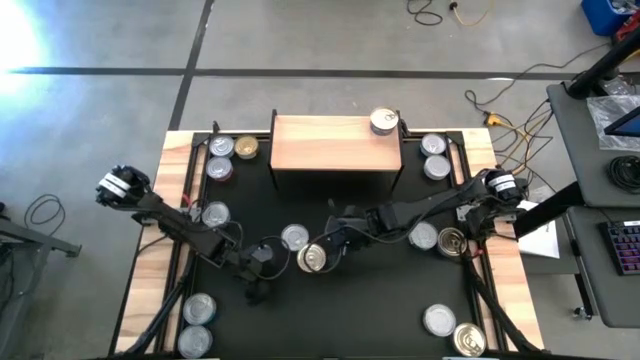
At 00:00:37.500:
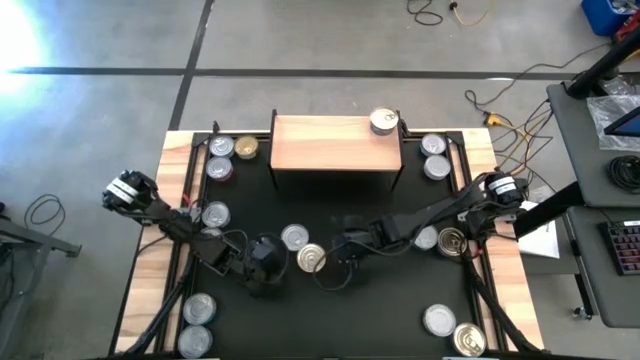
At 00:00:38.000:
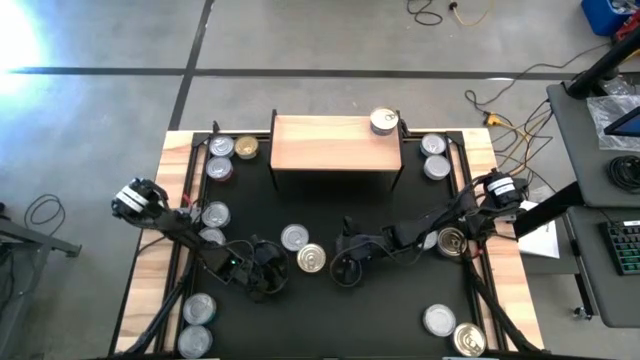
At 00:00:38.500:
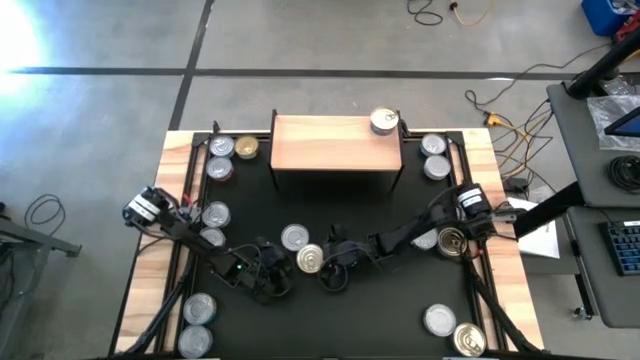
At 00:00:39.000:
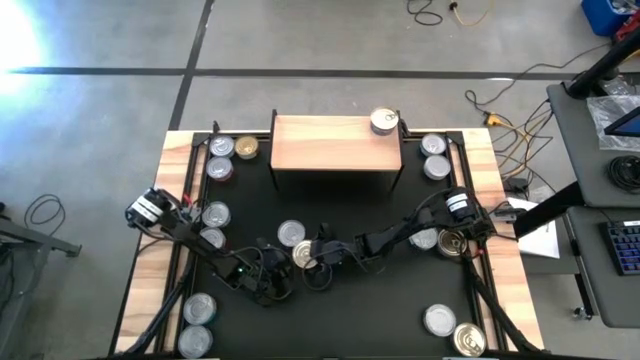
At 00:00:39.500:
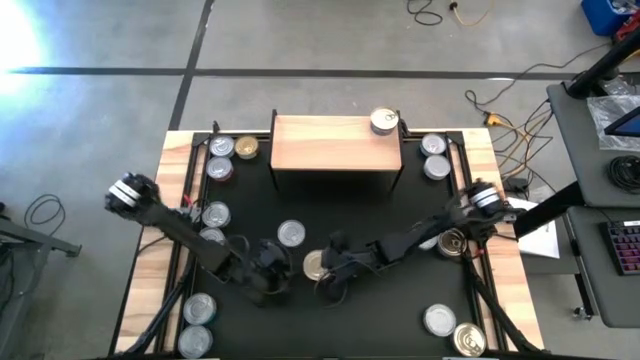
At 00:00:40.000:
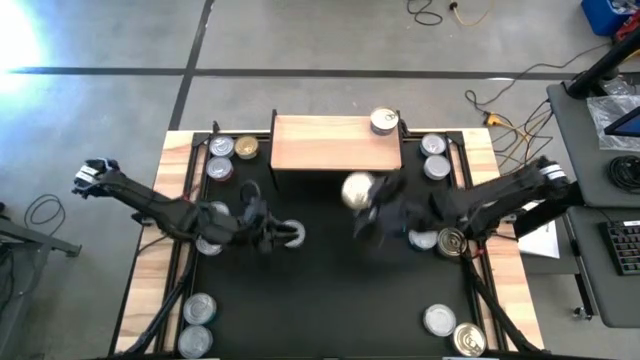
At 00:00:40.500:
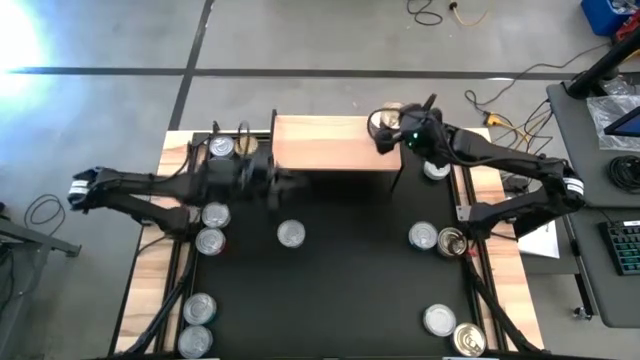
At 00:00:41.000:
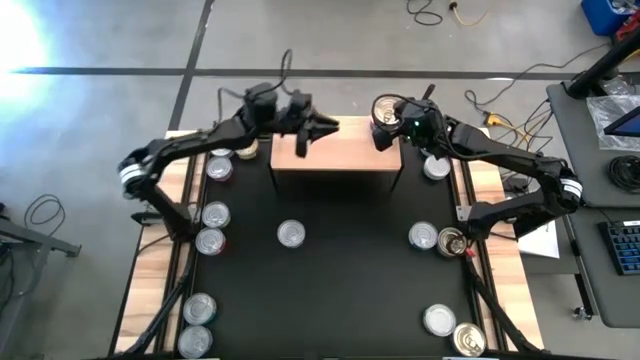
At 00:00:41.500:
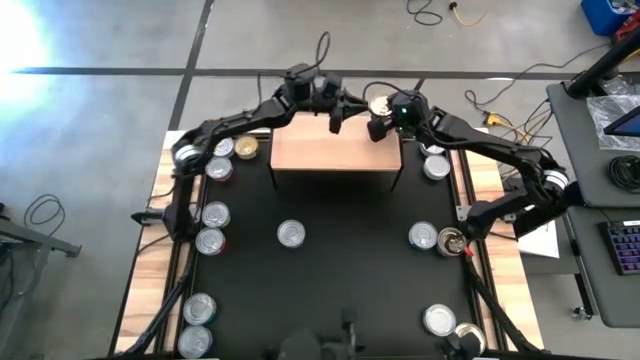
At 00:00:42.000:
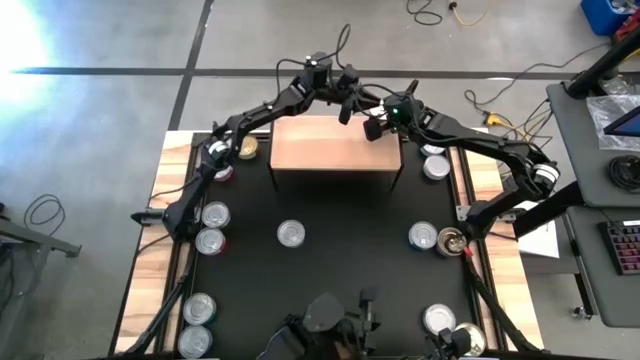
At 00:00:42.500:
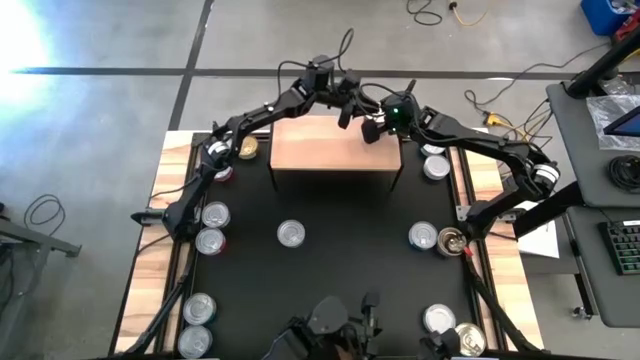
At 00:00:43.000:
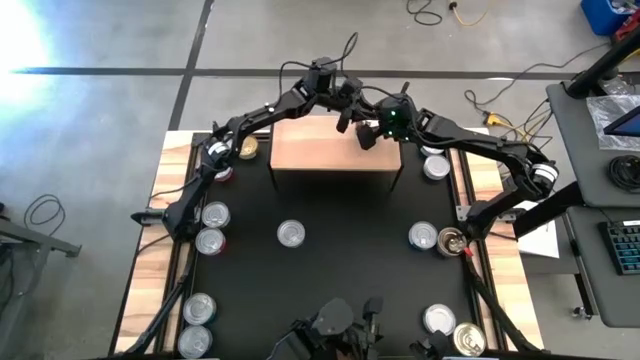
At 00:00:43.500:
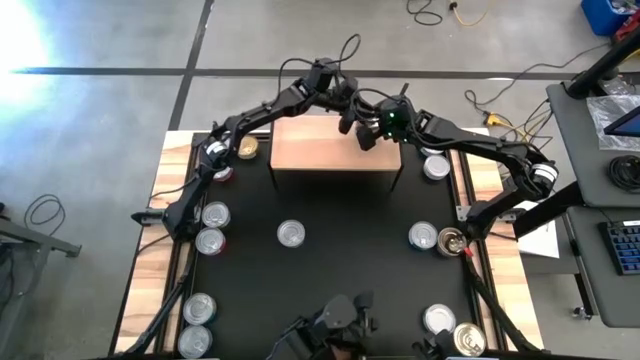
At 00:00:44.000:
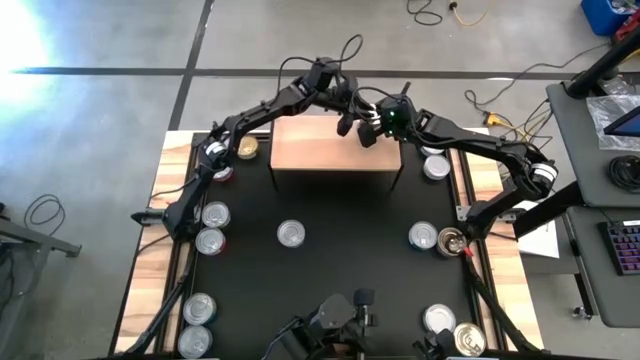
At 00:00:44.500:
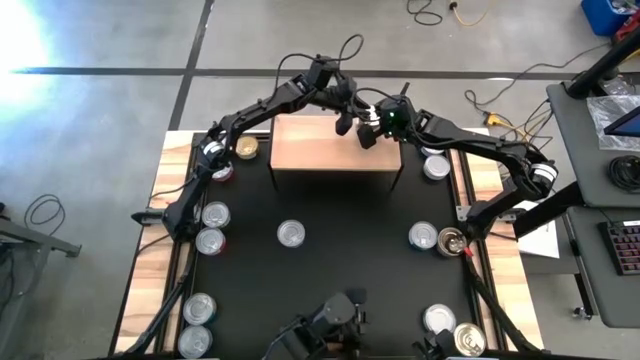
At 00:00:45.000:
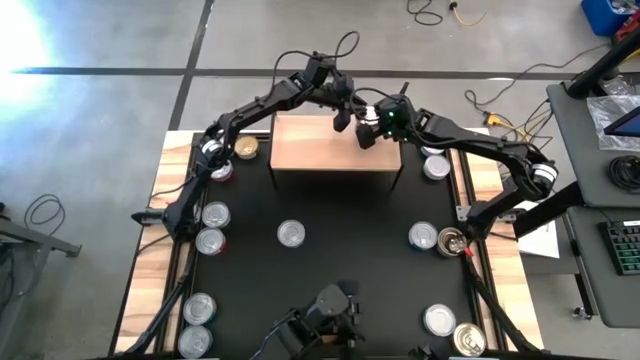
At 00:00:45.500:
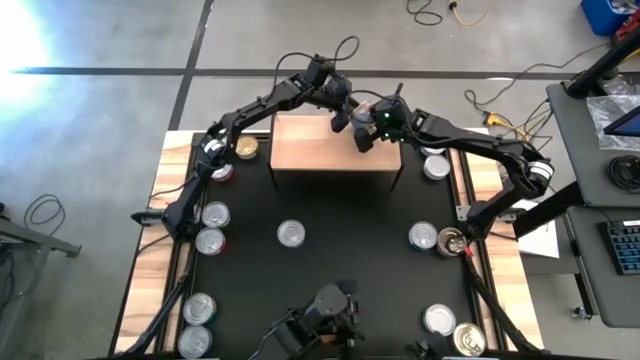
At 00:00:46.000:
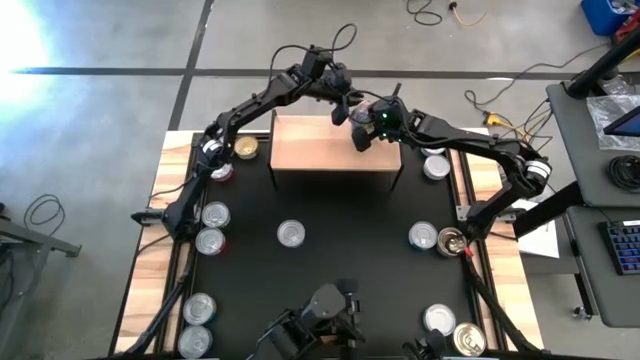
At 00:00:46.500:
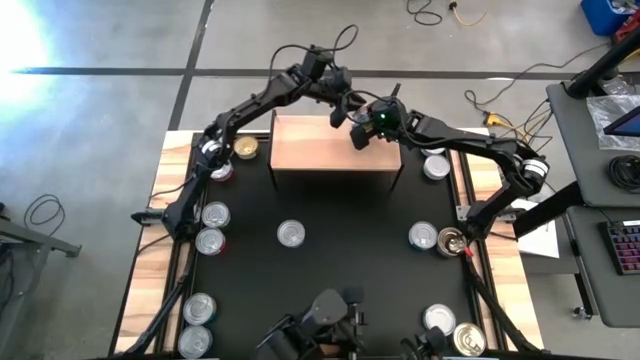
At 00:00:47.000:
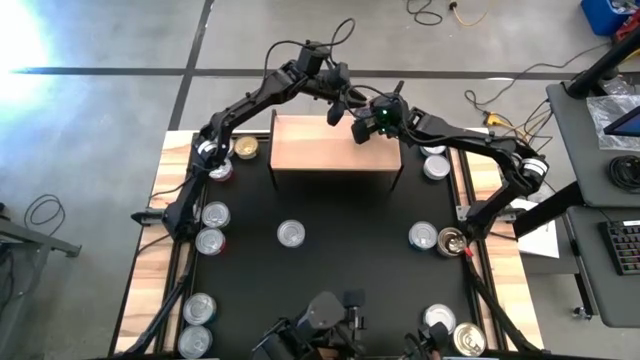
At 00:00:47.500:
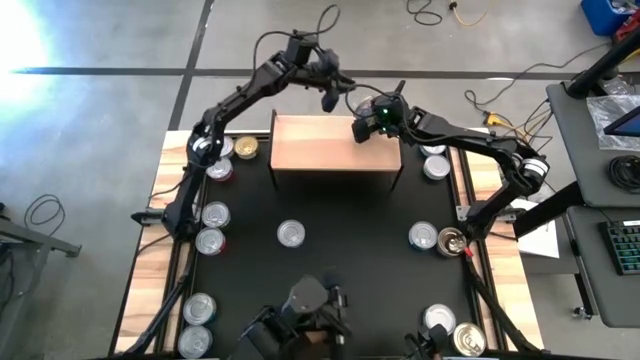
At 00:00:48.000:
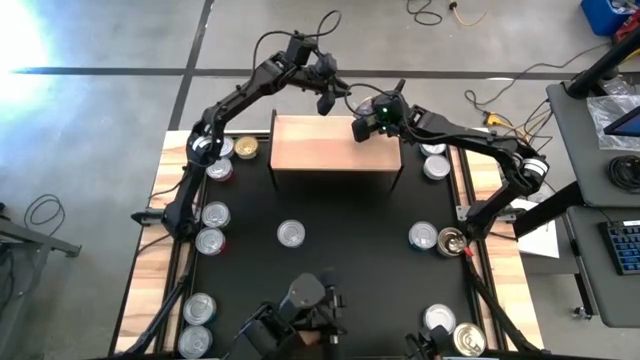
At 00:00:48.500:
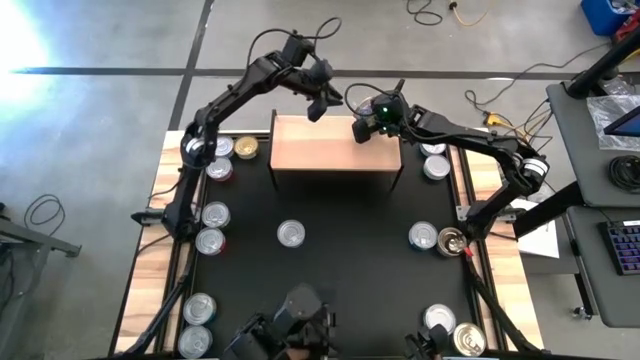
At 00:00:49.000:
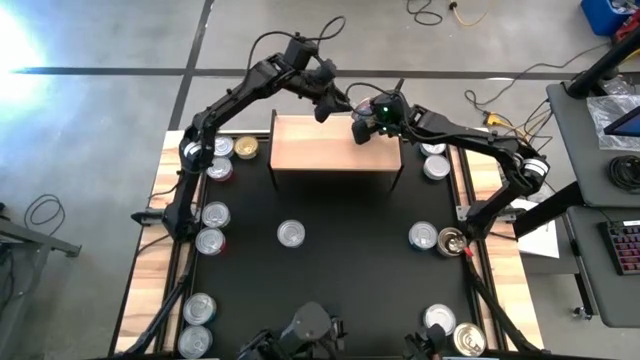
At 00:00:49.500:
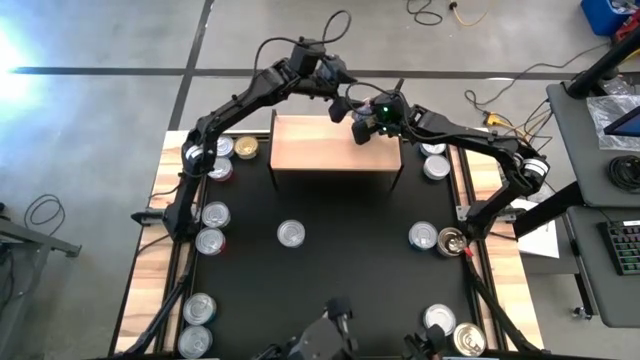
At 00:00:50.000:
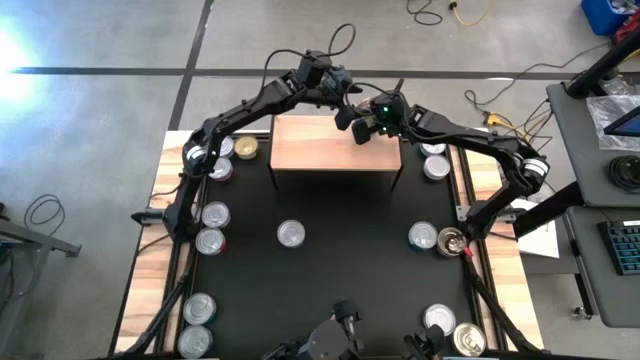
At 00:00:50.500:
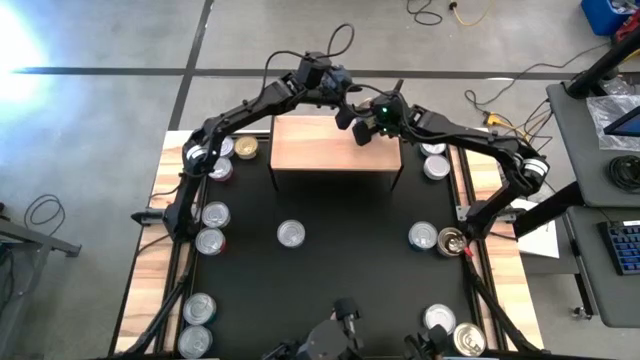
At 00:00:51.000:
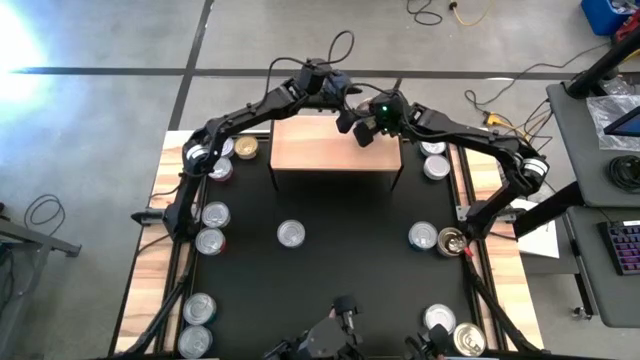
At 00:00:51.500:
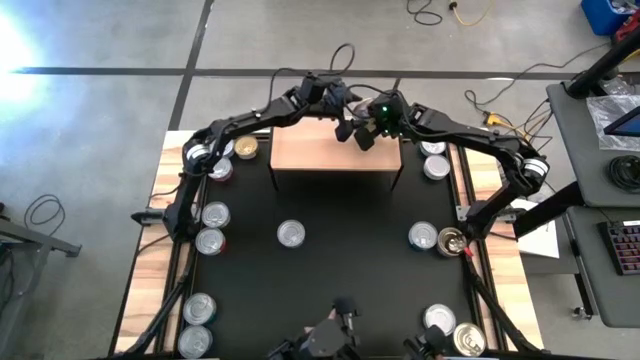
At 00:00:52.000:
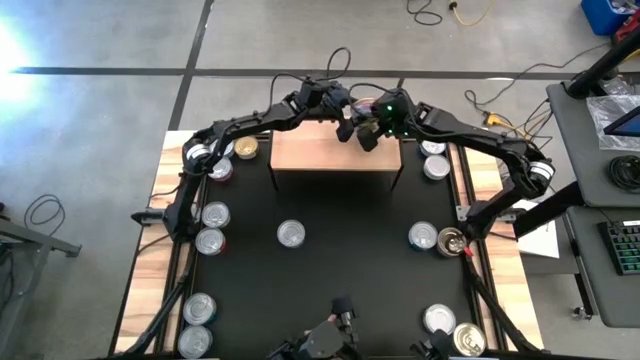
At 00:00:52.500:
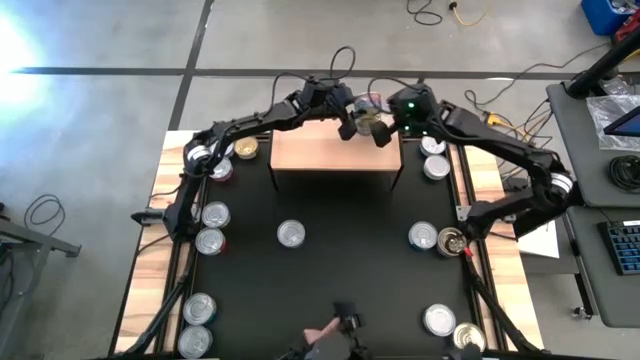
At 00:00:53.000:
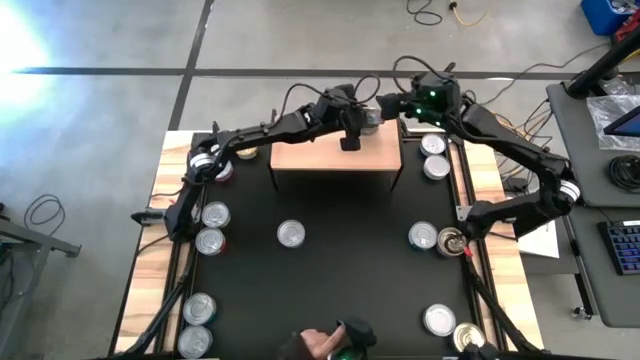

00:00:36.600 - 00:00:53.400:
Task: Stack canned seafood by type on shelf
Stack the top blue and pink tuna can on top of the blue and pink tuna can

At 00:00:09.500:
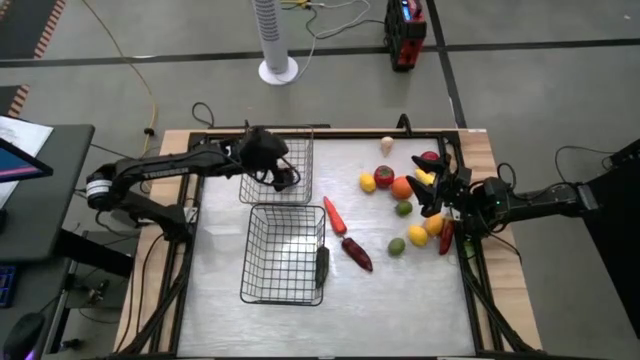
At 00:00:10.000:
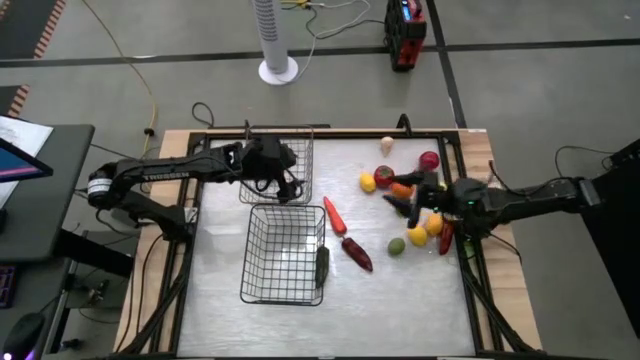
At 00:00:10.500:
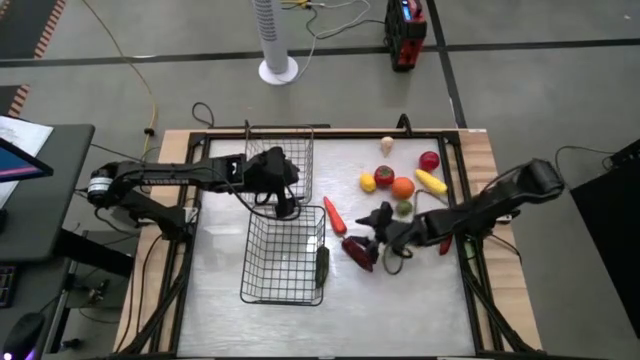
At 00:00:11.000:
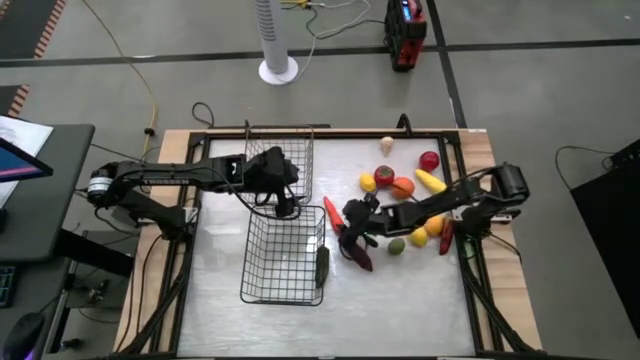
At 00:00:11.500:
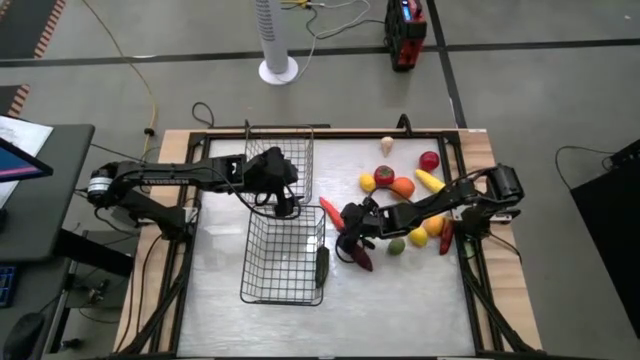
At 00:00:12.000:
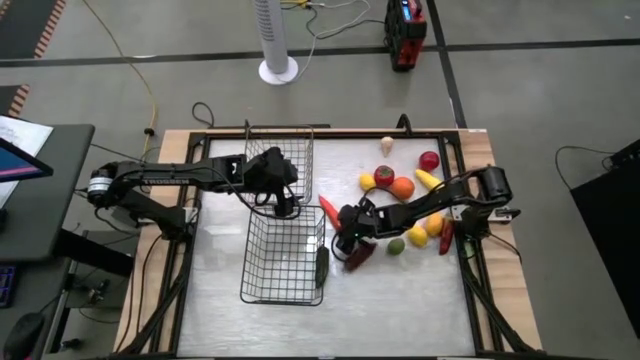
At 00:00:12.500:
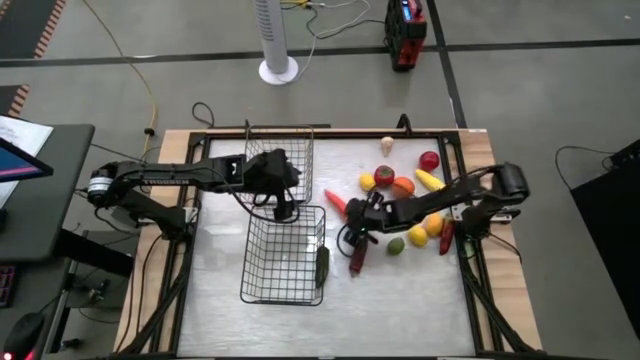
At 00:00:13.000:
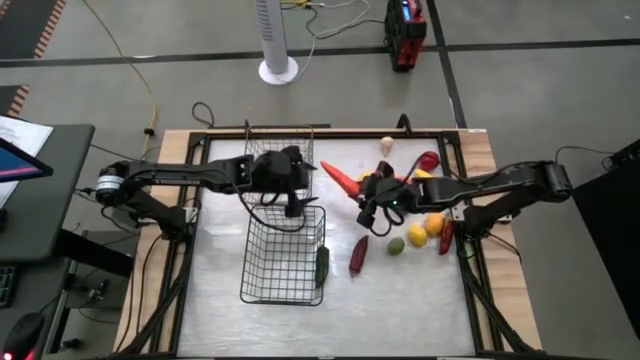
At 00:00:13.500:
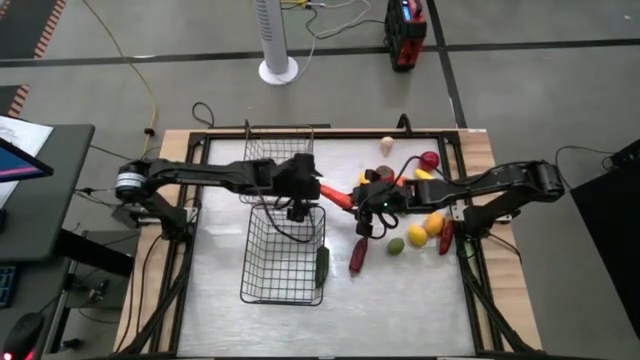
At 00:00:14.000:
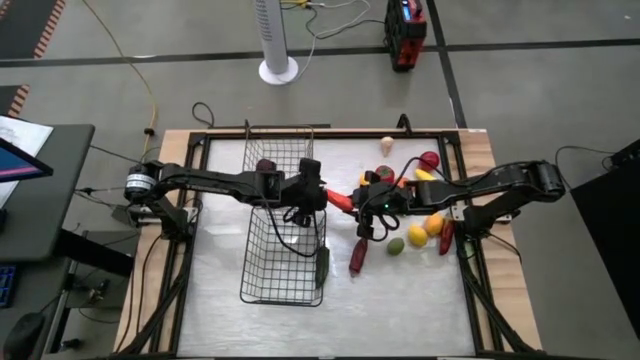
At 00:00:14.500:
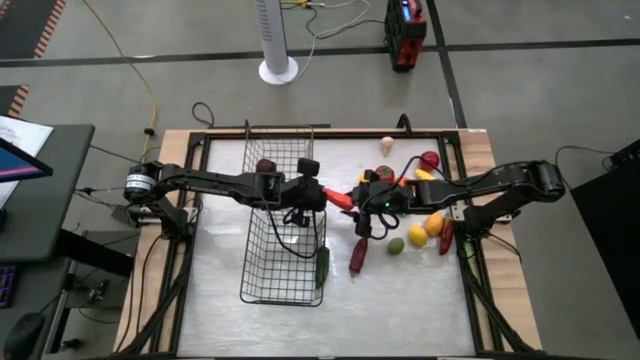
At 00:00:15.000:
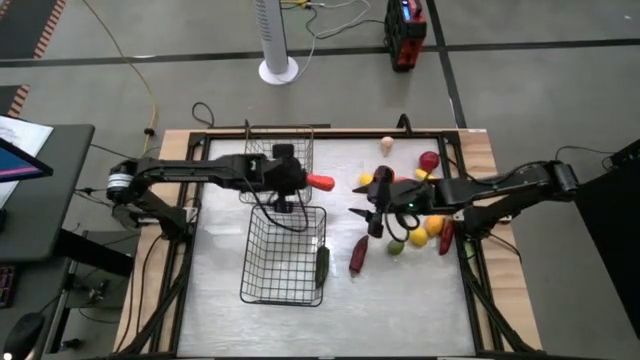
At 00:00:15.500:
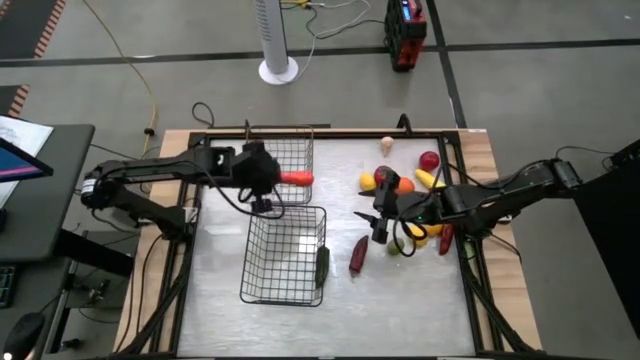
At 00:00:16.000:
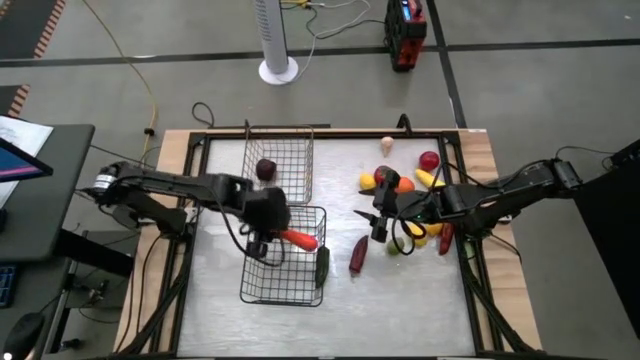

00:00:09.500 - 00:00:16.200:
Task: Sort produce into baskets
Put the carrot into the black wire basket
